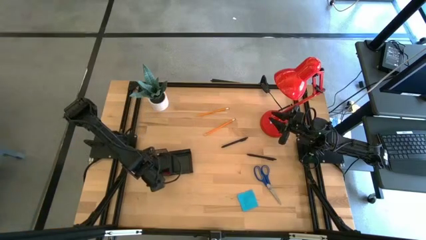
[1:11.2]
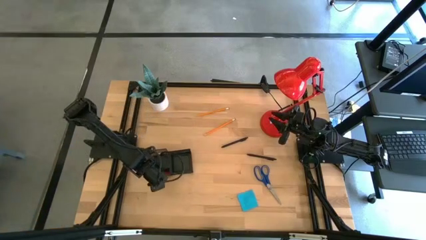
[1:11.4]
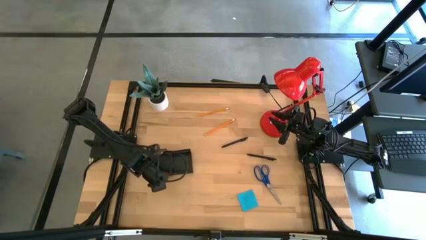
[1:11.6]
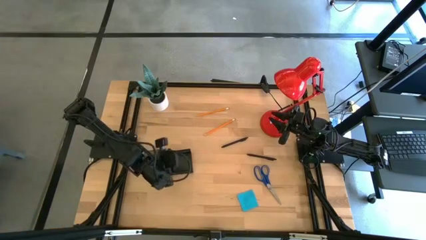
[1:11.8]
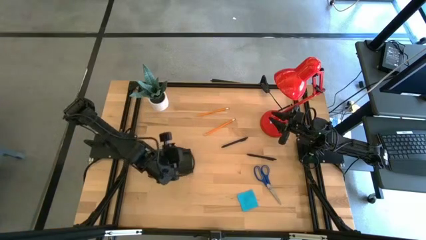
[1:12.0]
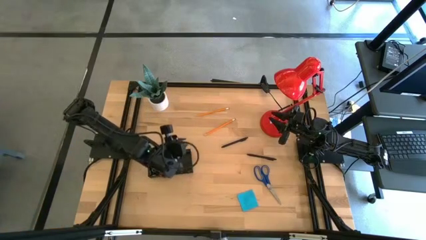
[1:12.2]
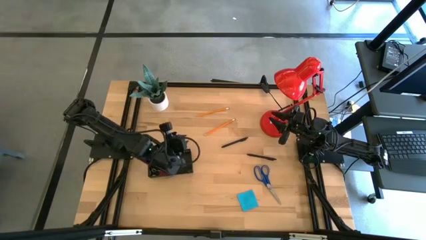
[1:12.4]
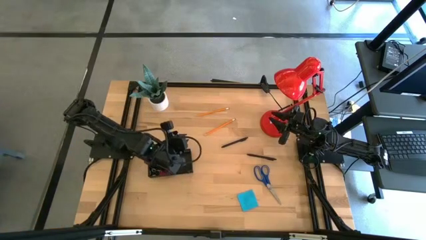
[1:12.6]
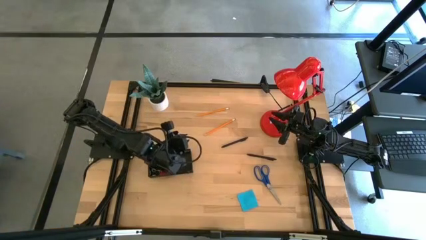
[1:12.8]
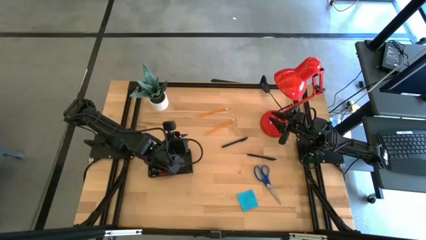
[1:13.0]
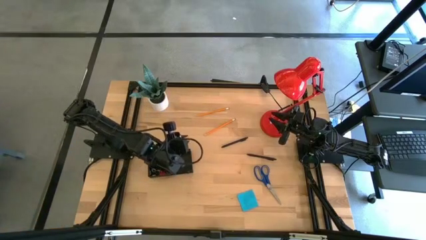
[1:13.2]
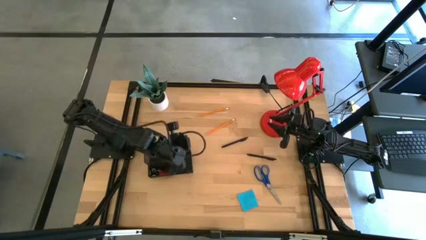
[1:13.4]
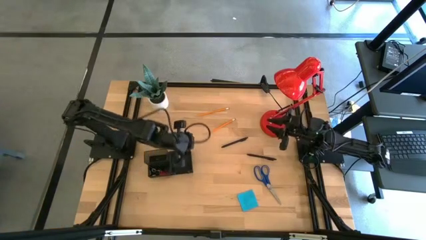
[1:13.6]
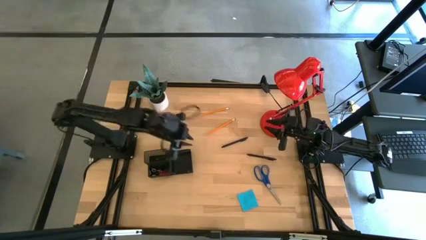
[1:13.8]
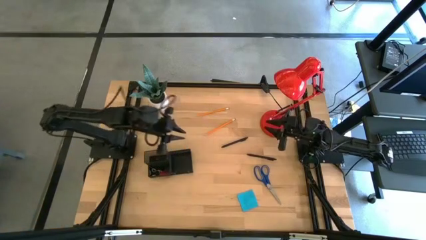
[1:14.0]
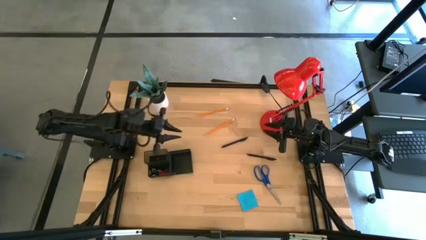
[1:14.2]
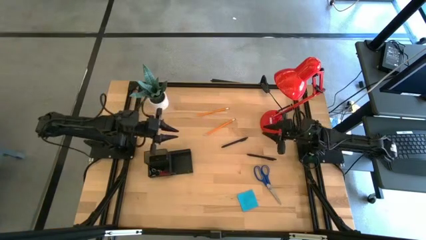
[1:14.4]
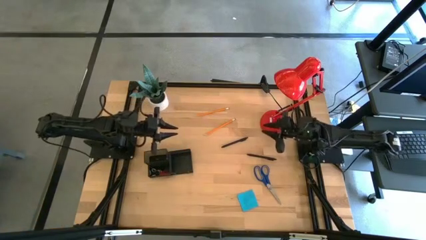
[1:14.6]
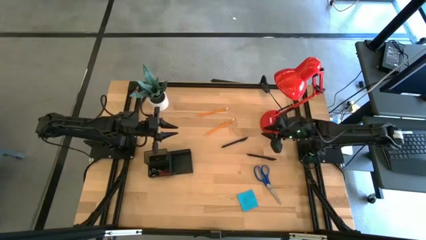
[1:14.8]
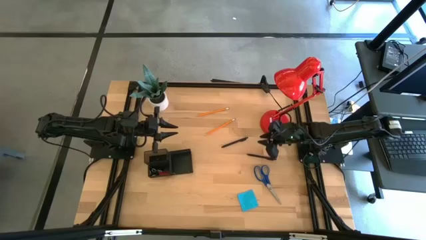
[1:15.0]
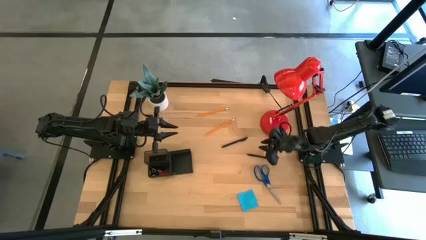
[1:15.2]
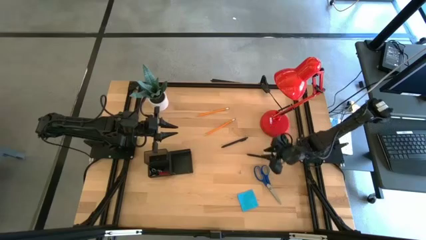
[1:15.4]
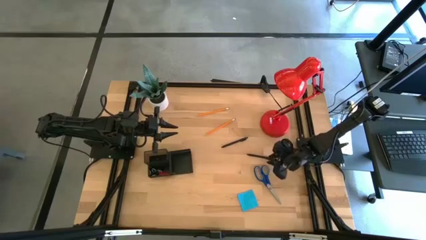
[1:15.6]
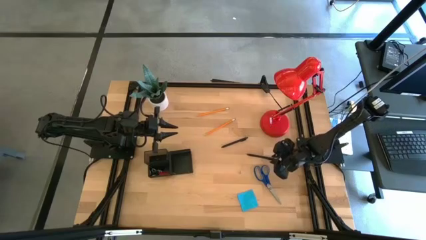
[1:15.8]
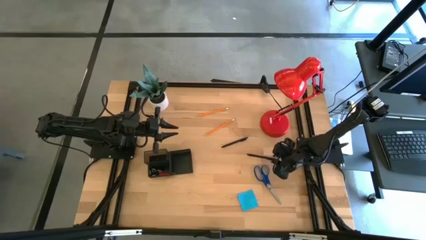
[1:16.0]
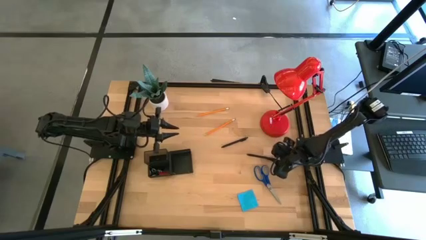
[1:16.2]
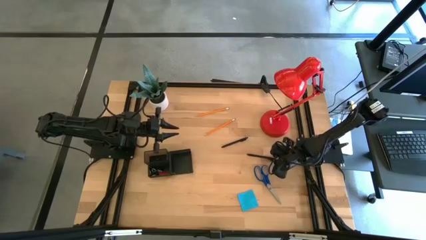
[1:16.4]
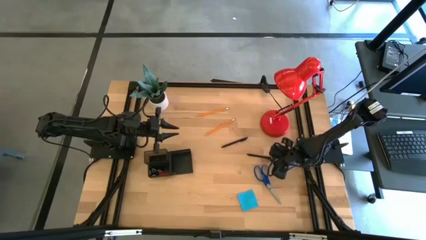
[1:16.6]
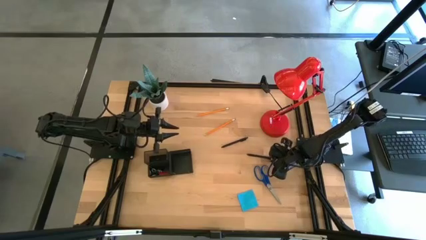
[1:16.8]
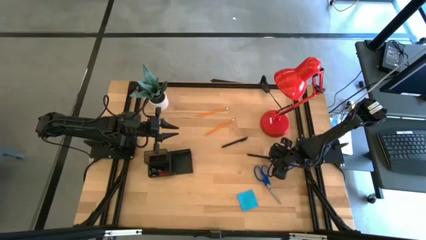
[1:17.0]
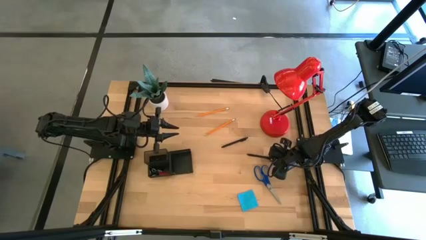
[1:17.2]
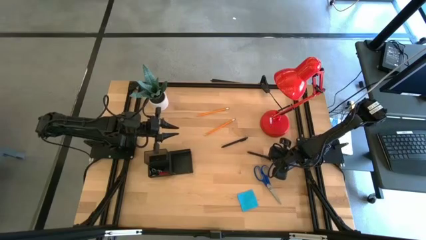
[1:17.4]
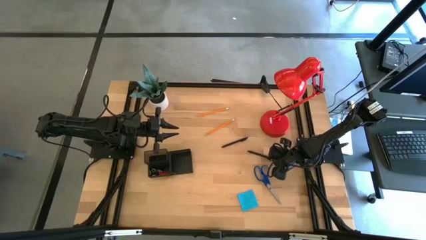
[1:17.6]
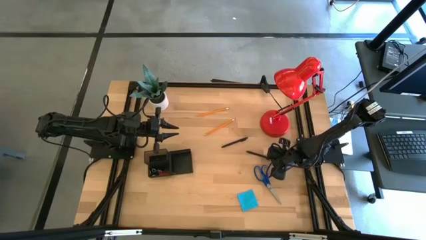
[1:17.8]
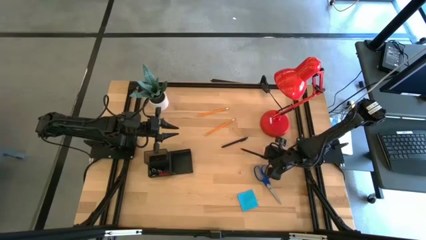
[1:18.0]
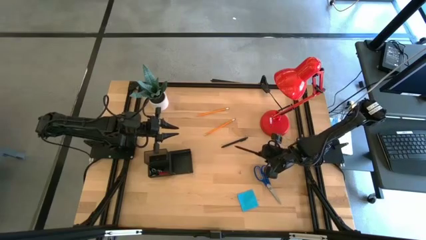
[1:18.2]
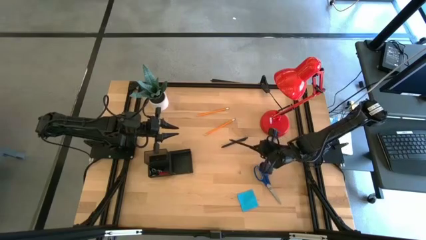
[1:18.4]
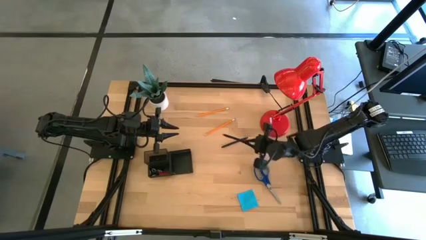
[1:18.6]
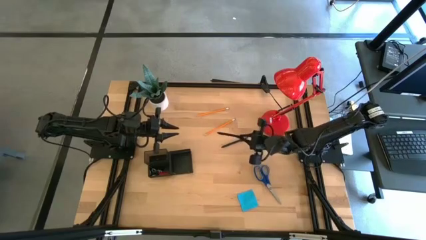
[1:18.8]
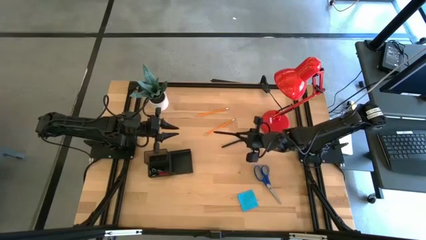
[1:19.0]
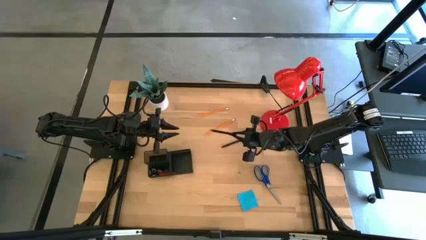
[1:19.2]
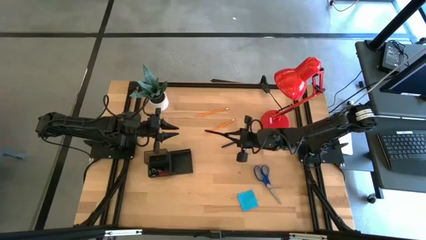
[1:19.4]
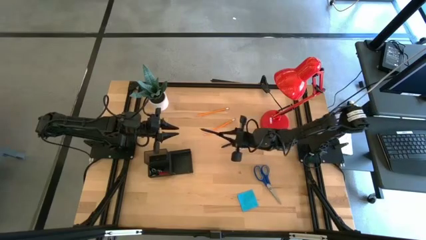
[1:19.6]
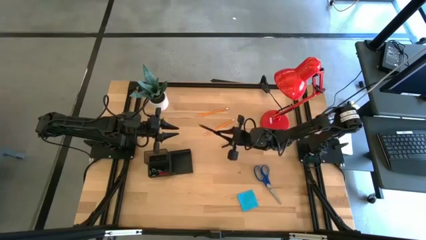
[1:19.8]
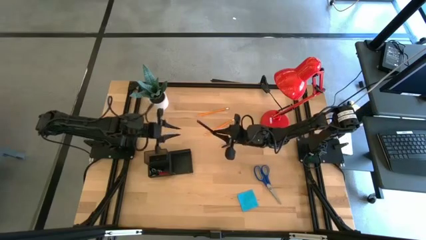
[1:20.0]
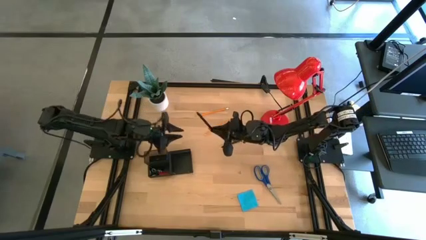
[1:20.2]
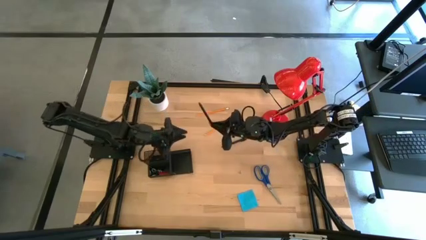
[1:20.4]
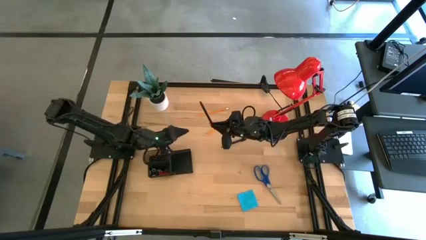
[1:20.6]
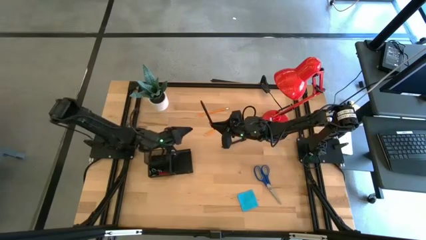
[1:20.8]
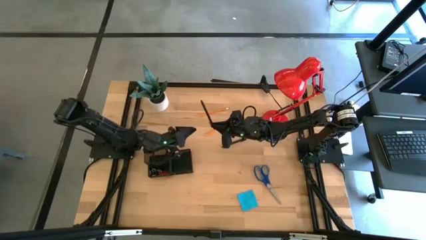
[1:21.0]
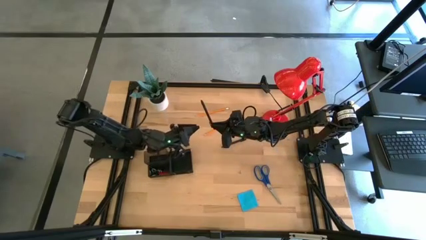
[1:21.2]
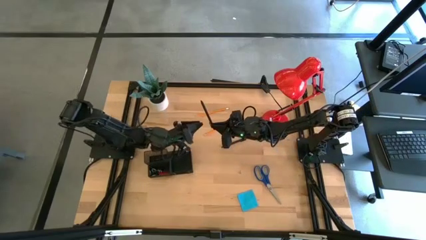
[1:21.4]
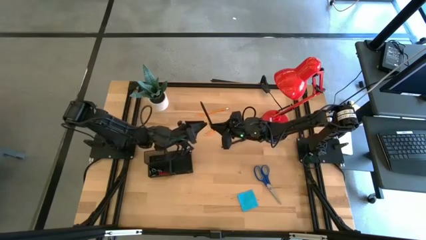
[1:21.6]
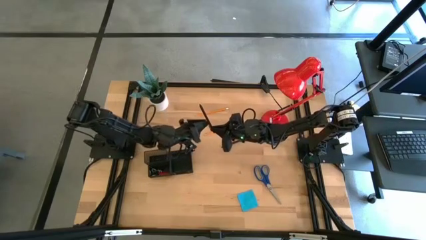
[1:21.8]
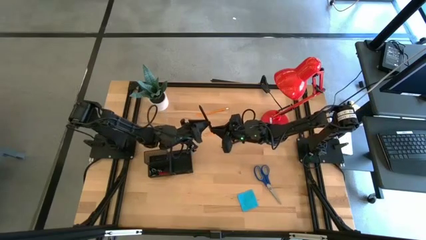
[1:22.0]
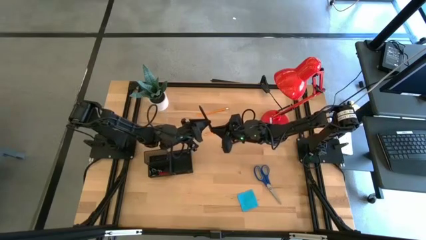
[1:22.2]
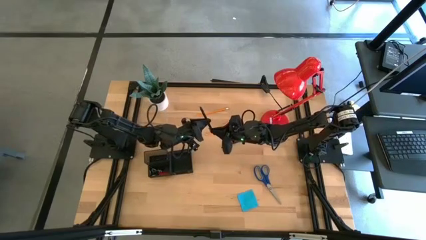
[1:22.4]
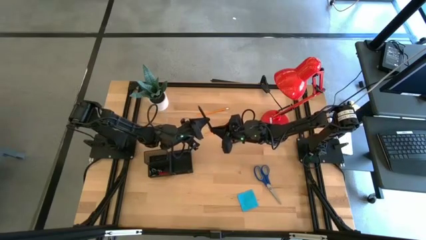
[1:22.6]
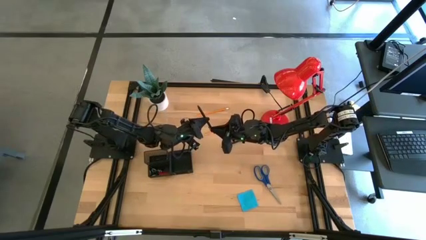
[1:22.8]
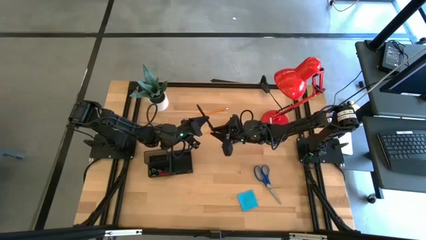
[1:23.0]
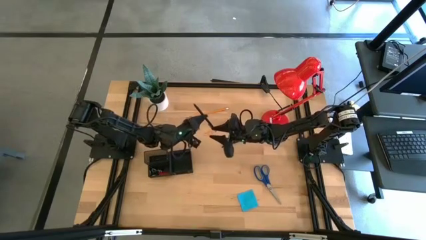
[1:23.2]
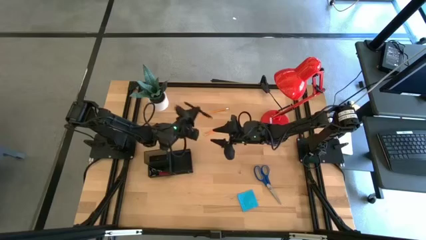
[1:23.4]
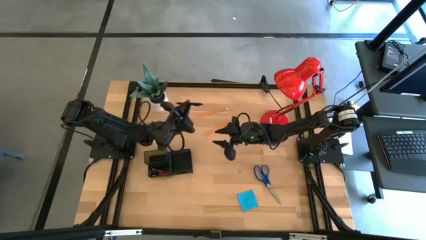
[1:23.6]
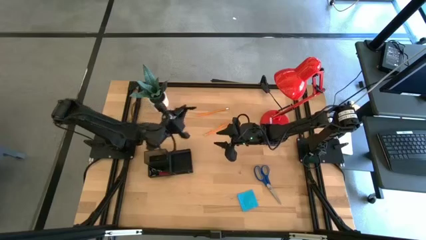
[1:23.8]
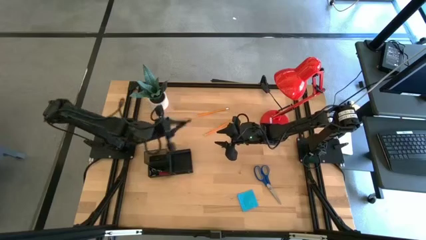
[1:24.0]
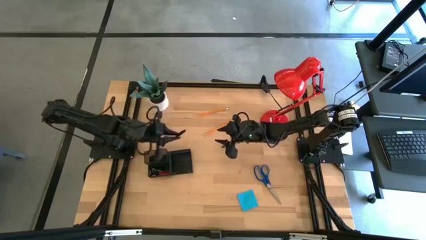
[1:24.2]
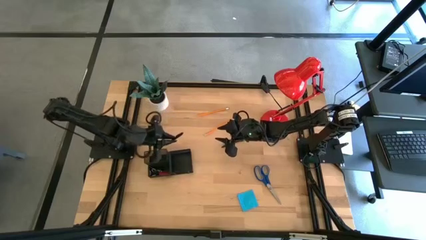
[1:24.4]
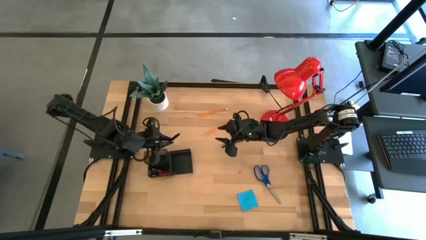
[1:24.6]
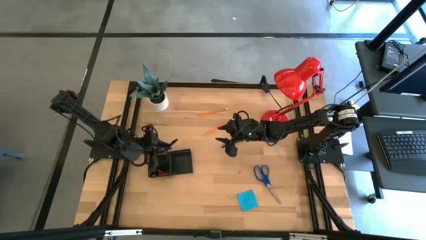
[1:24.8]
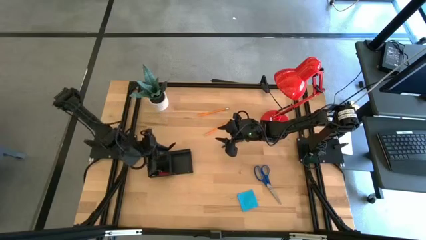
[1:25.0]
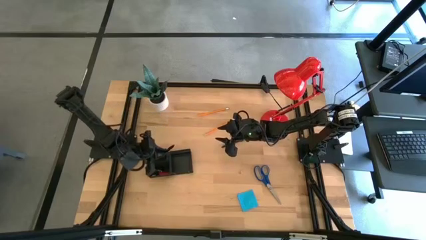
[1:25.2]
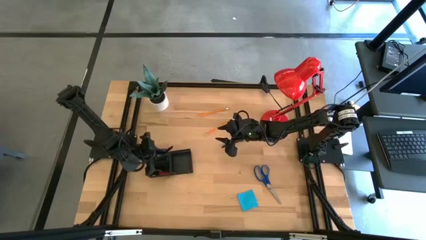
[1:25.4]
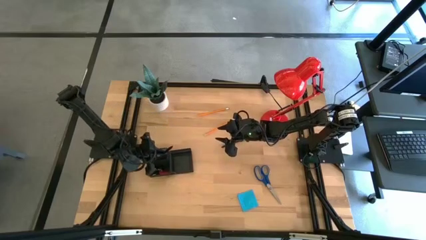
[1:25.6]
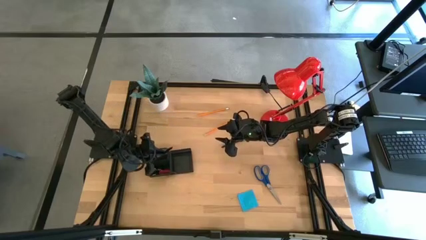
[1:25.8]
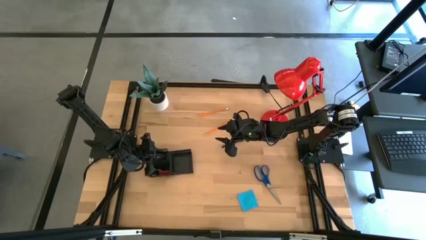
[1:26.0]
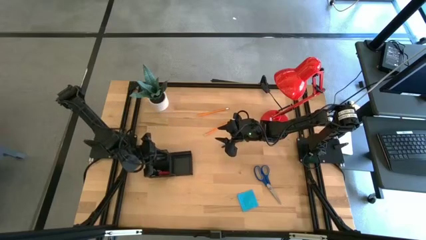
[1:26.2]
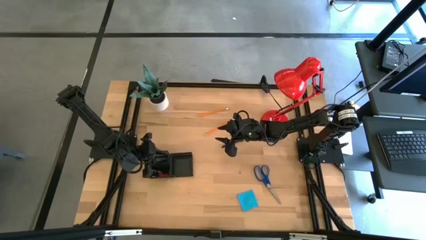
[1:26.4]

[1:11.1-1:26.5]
Task: Pick and place office supplies into organizer
Put the bottom black pen into the back left compartment of the desk organizer
